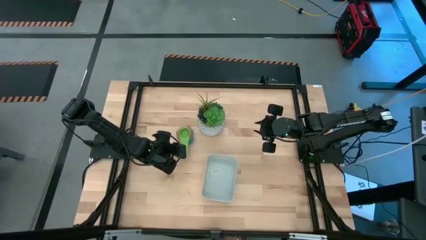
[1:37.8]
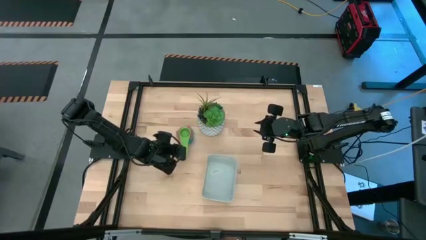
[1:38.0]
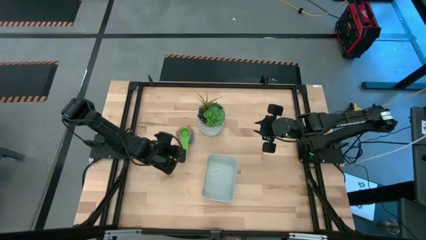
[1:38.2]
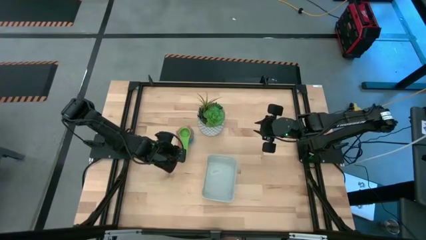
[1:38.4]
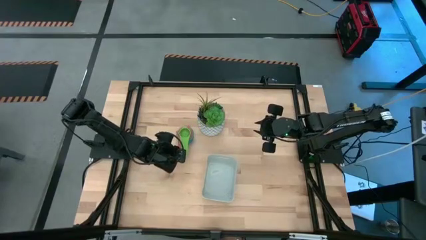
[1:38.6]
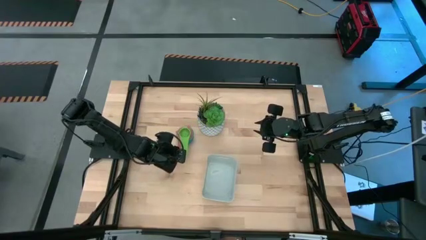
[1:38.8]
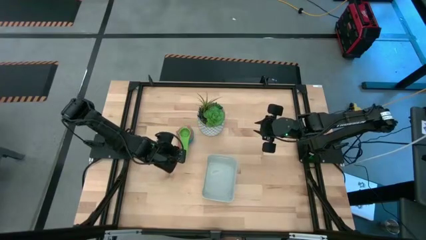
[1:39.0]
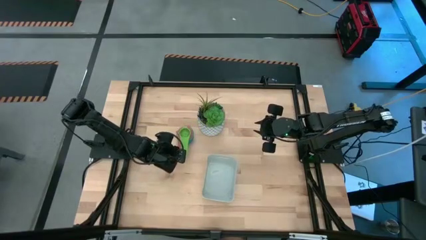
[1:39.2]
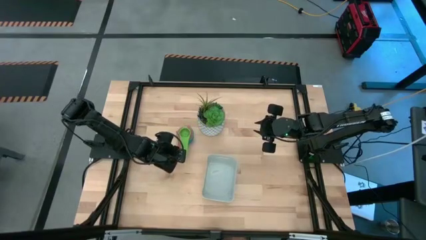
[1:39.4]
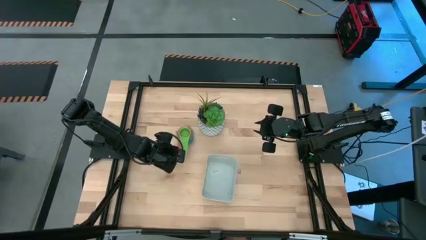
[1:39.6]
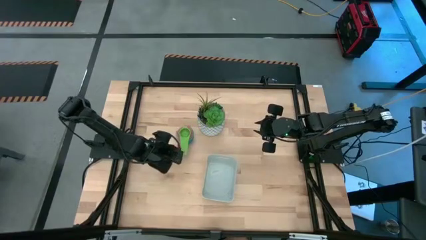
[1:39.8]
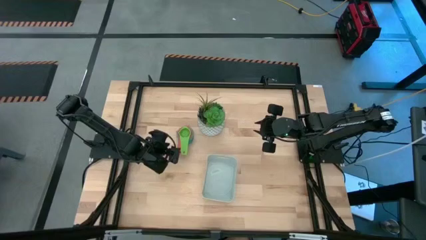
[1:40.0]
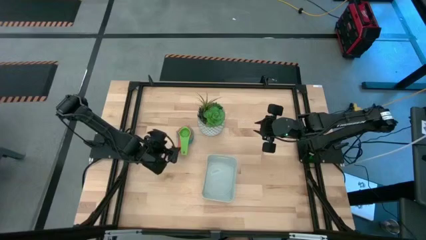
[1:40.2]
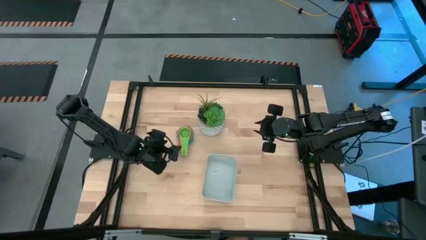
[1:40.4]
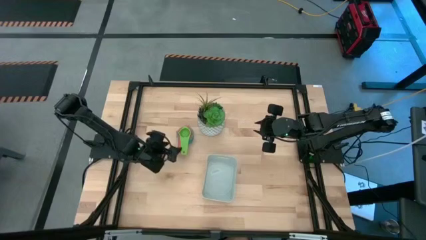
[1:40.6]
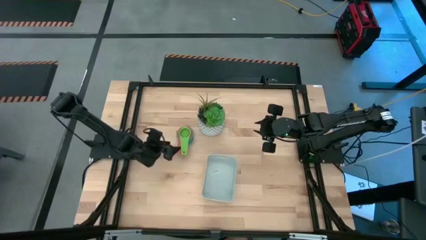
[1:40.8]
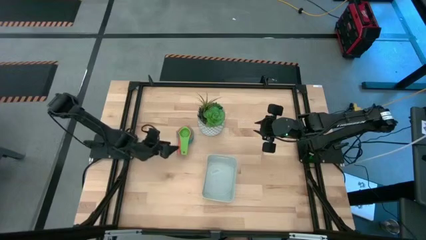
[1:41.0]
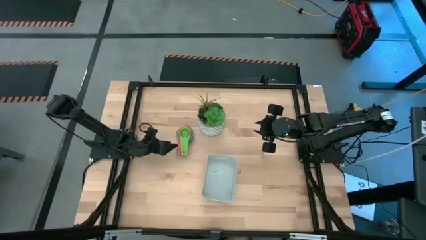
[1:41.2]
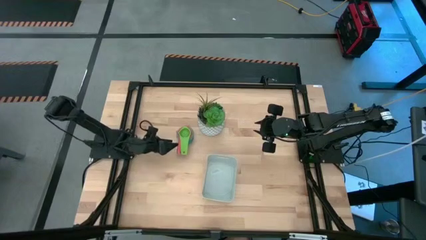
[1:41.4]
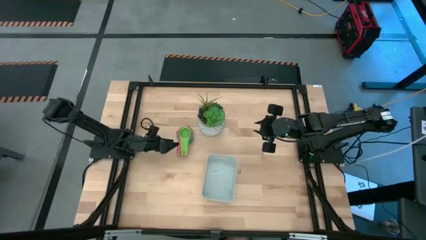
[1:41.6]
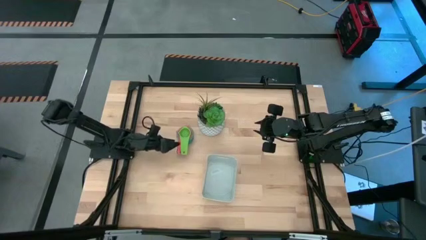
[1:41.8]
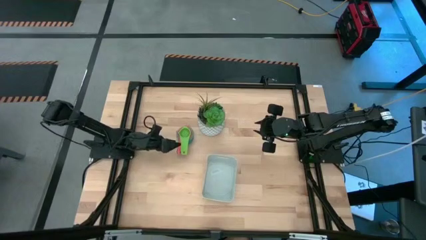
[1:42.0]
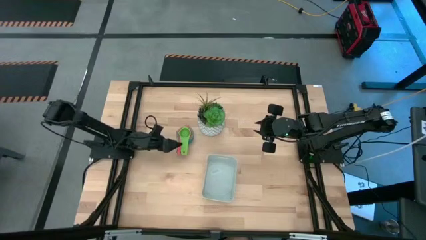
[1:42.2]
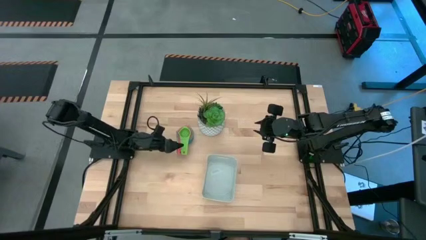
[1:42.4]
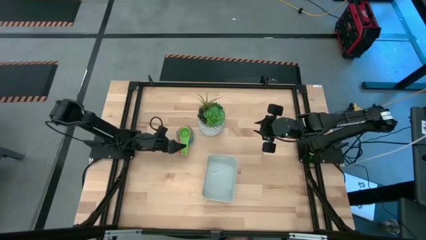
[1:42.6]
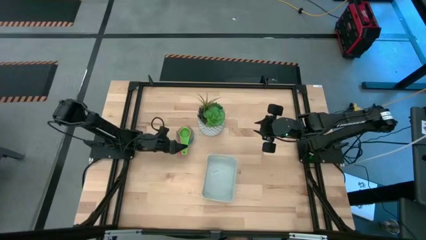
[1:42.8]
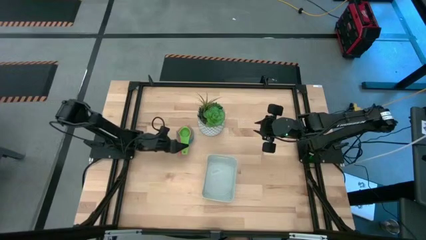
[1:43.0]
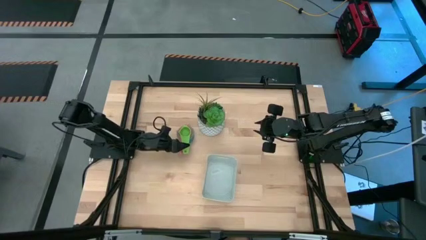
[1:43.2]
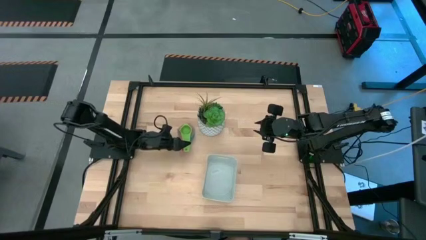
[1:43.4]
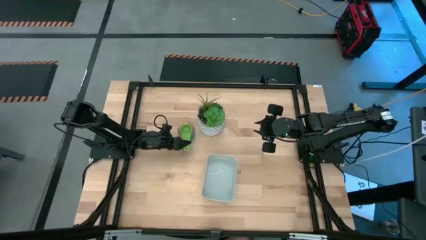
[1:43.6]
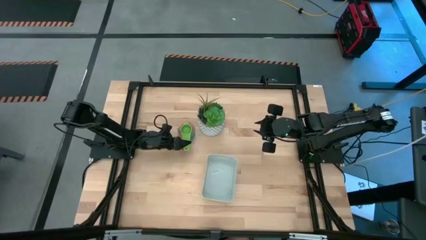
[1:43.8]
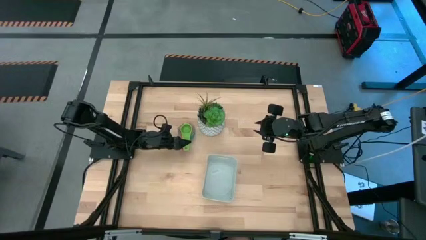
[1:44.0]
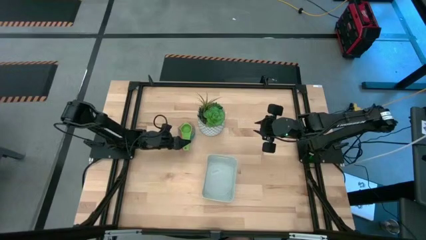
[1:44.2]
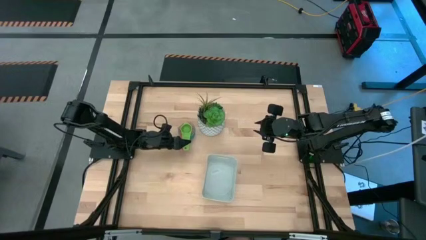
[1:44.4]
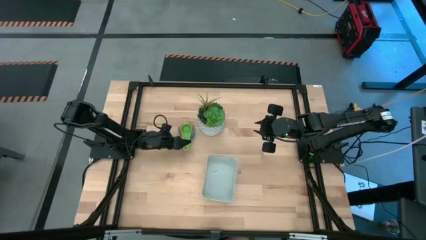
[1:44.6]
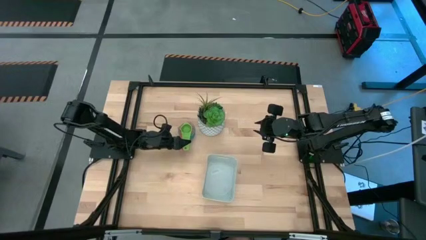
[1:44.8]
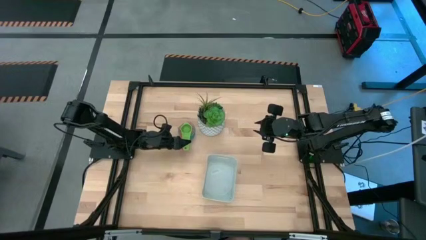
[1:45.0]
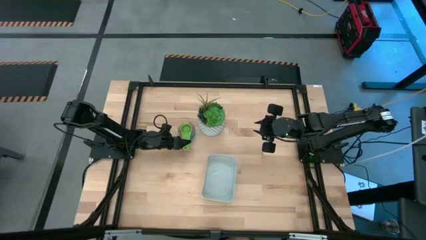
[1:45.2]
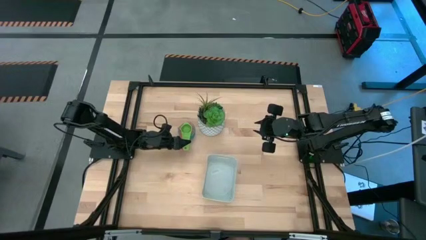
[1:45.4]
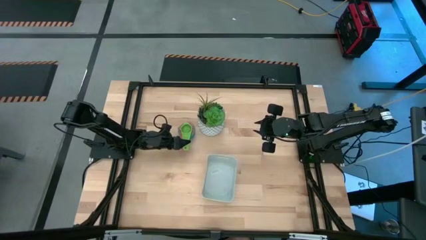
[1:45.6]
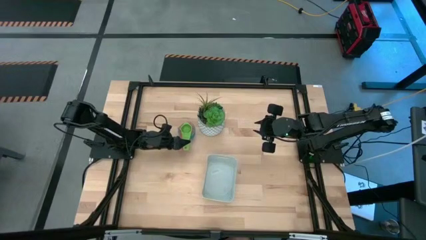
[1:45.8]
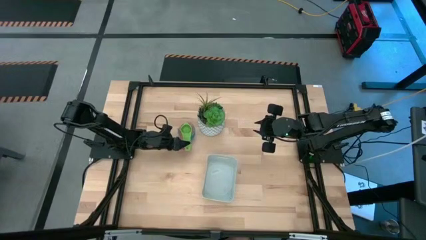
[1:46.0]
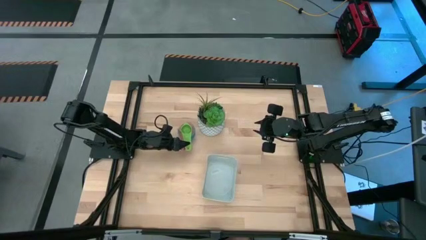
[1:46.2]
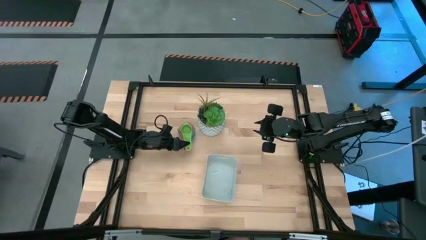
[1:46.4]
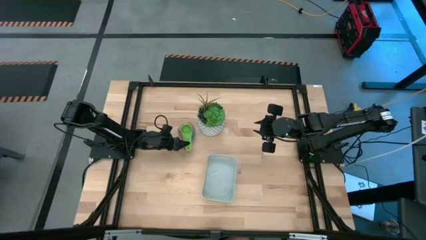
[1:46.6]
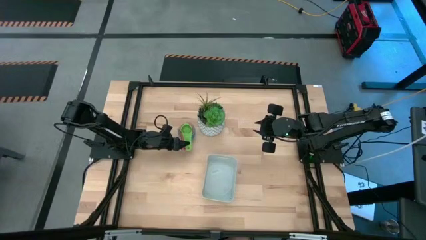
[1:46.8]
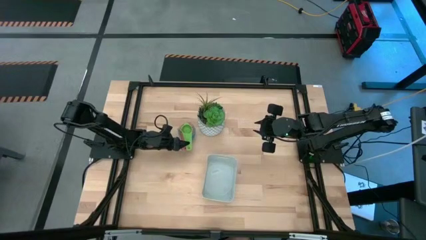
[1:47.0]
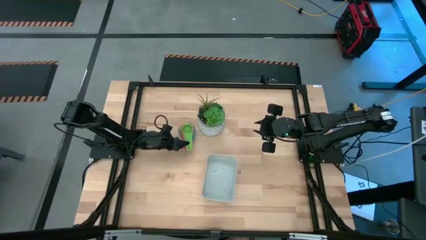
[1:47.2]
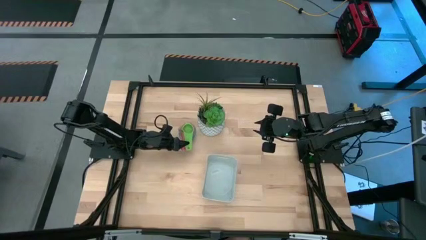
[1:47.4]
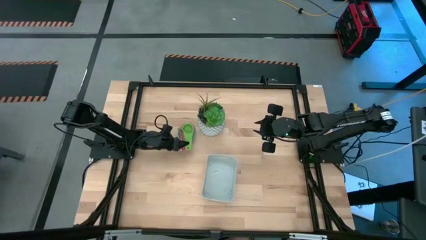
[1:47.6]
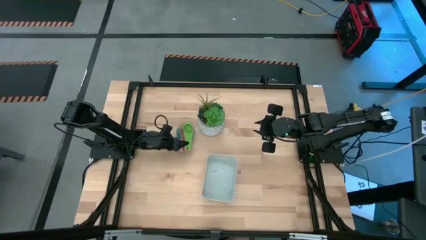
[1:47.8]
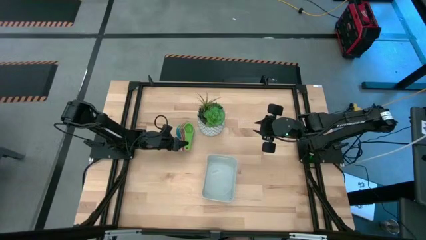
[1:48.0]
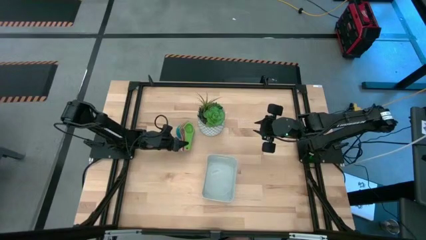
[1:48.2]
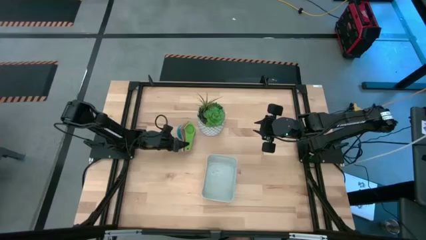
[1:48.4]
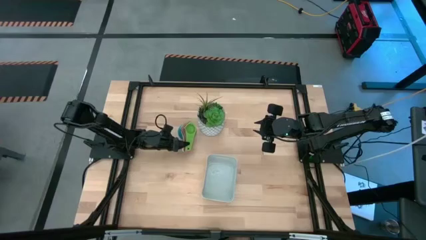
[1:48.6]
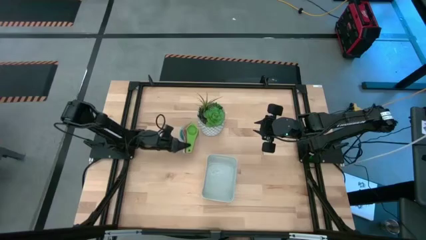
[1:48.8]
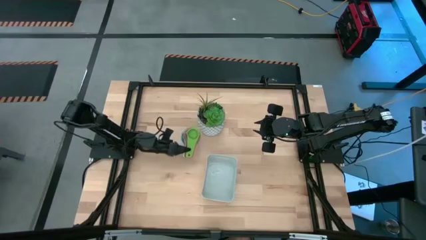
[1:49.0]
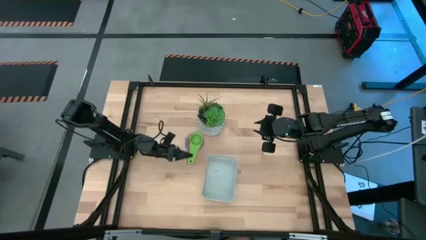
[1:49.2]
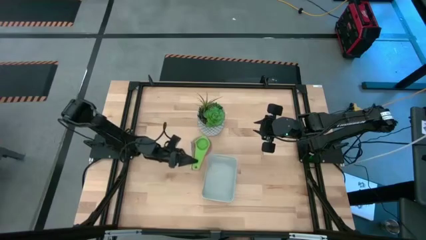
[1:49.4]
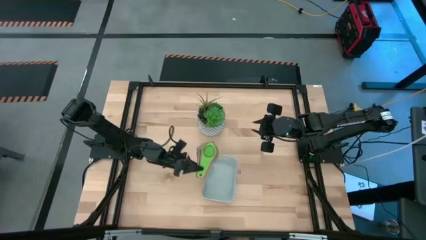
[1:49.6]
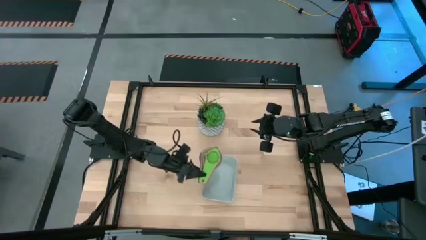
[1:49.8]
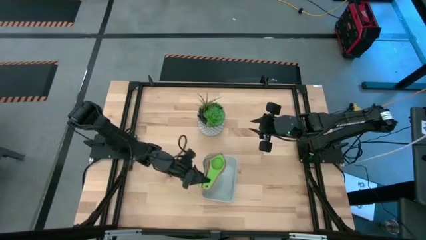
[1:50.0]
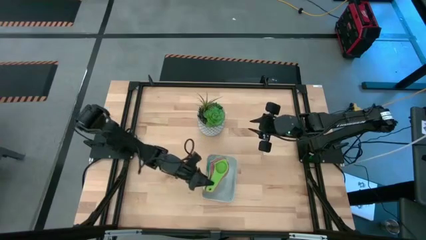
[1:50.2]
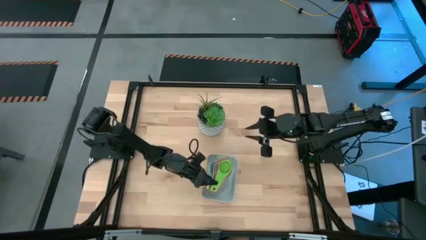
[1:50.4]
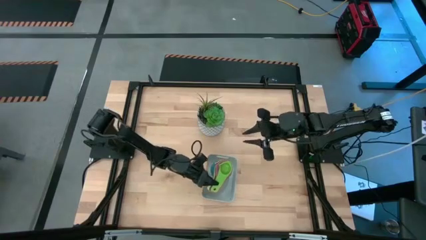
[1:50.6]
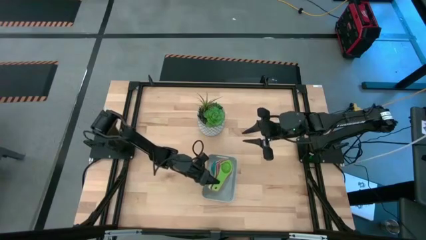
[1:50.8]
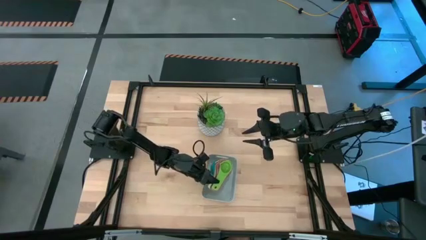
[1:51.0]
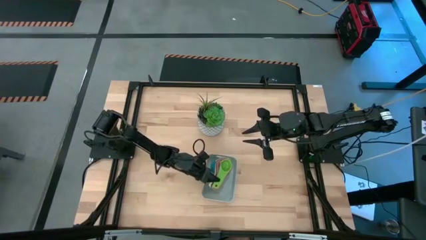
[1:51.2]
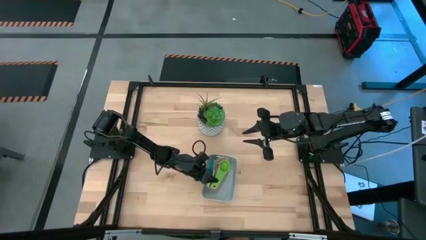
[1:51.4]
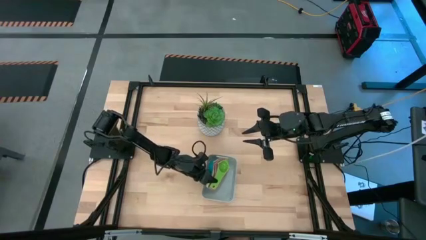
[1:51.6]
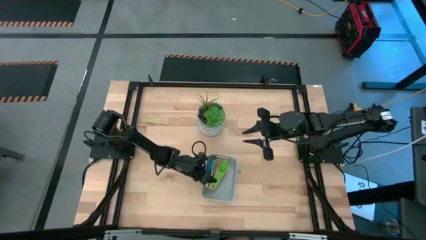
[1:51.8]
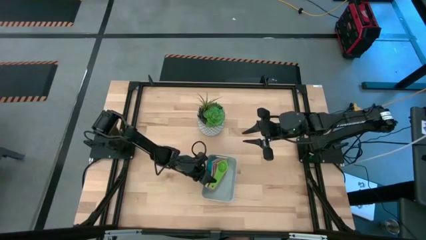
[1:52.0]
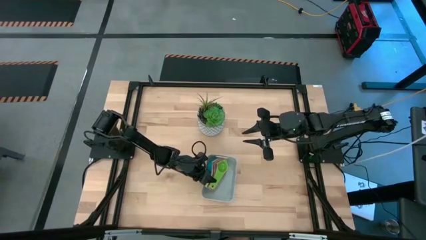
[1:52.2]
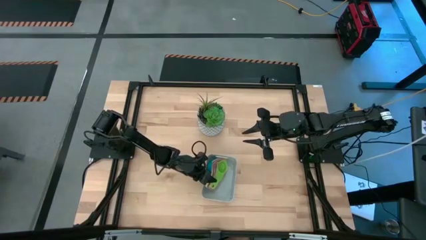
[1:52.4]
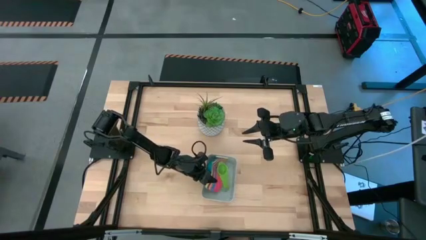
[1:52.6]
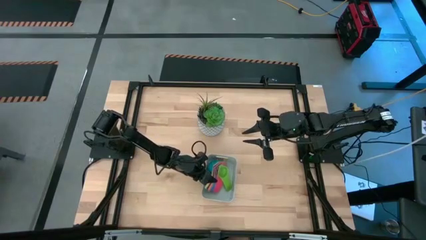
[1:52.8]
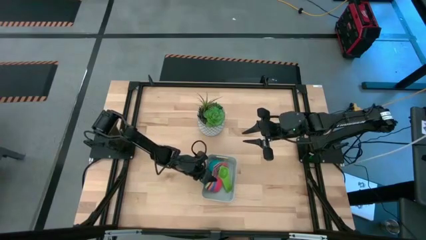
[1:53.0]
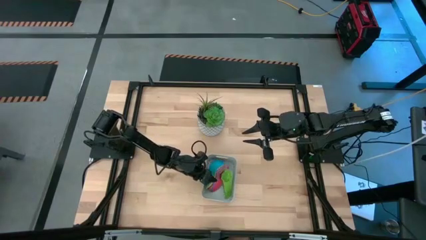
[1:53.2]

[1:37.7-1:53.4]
Task: Nest measuring cups in basket
Put the stacked measuring cups into the bin
